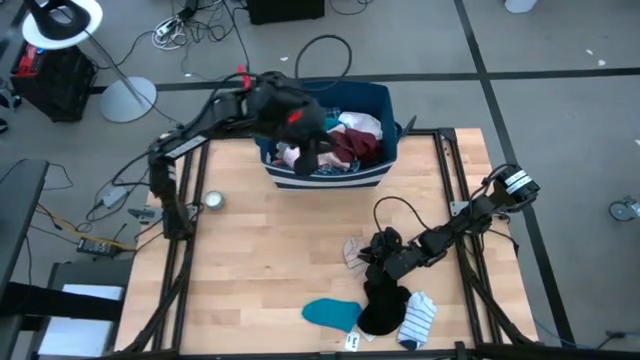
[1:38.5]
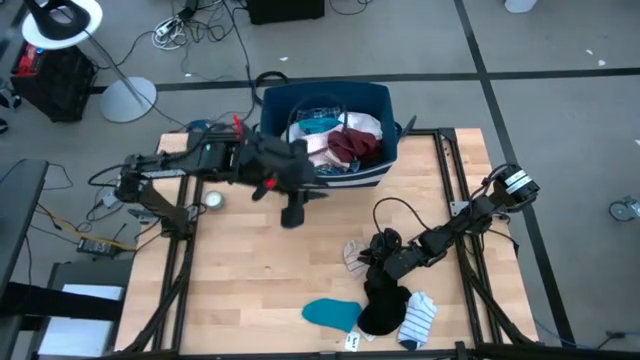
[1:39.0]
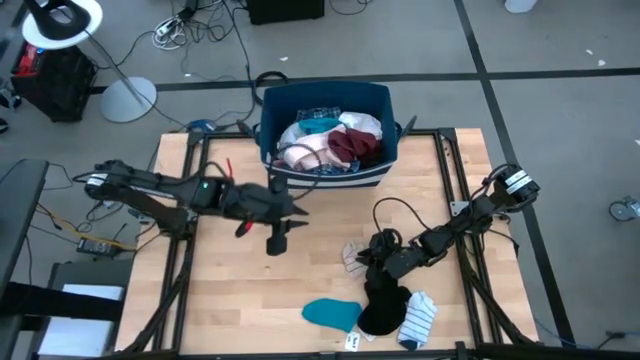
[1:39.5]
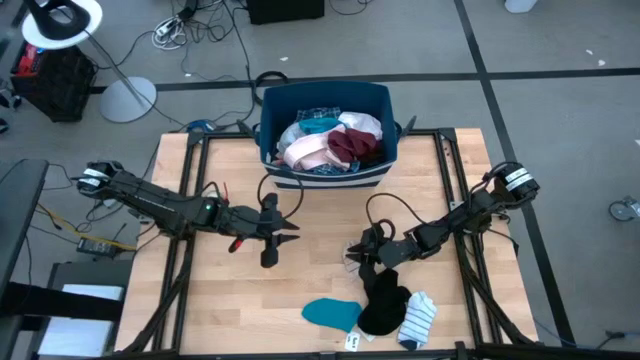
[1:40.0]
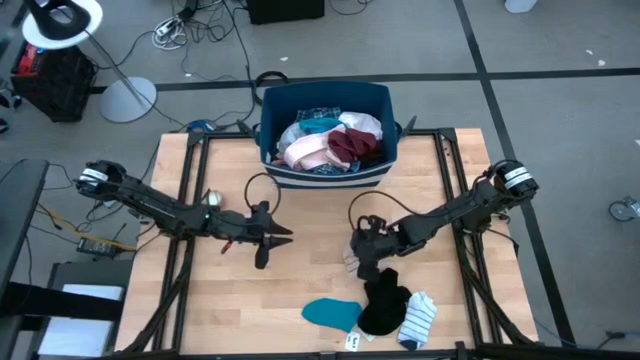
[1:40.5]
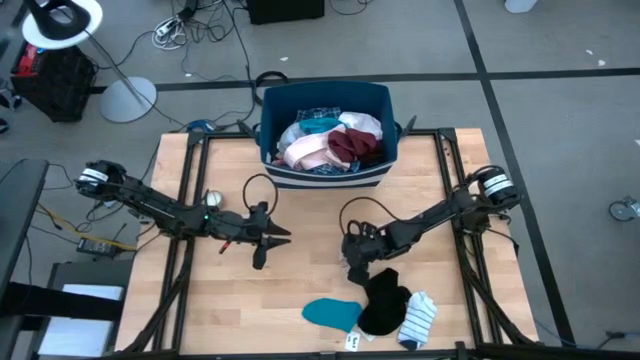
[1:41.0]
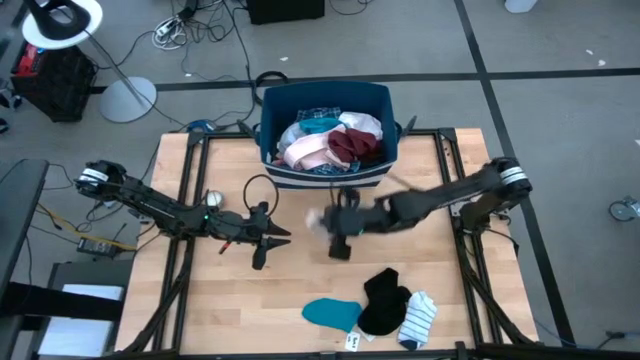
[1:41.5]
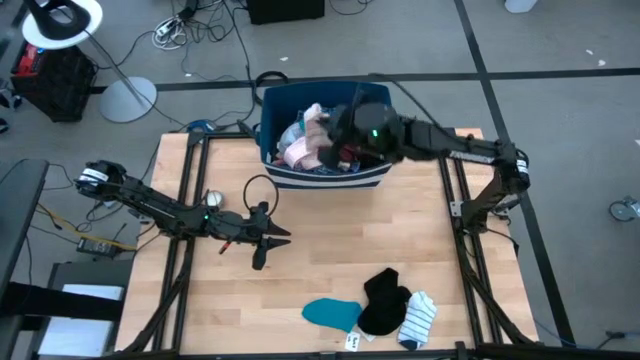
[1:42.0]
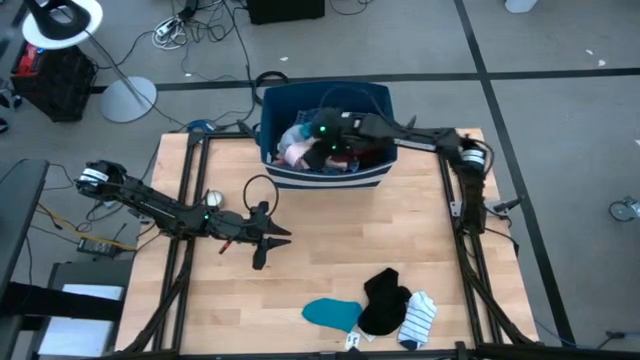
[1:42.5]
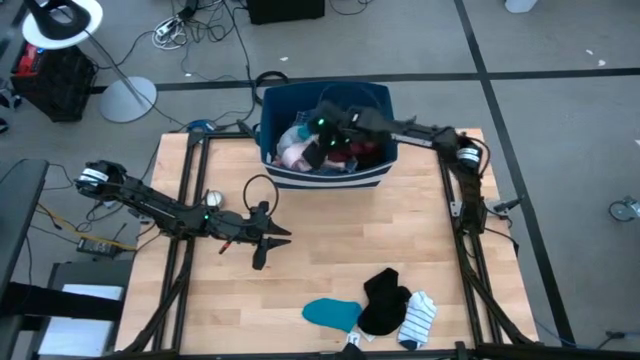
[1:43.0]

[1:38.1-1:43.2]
Task: Sort clothes
Put the striped sock into the blue laundry organizer

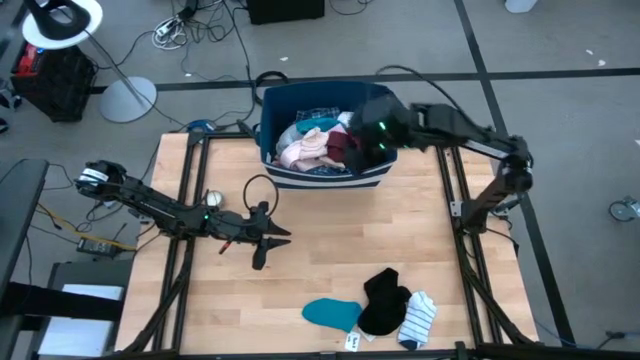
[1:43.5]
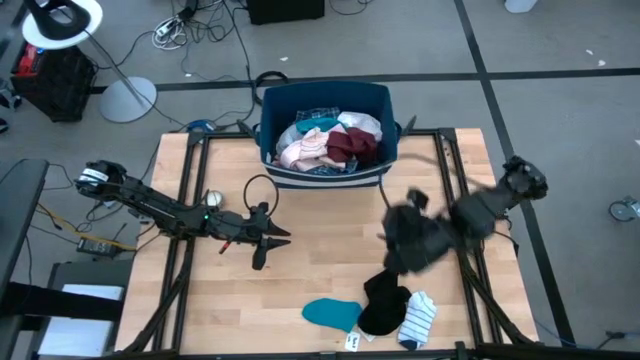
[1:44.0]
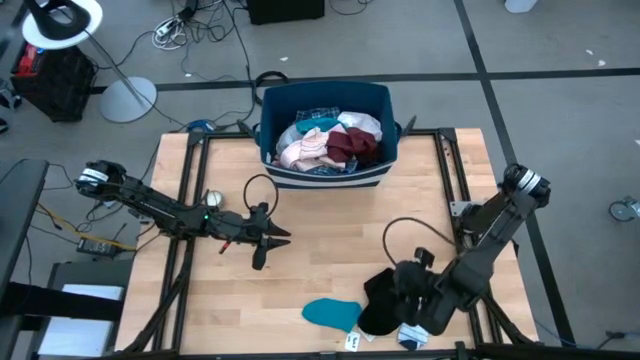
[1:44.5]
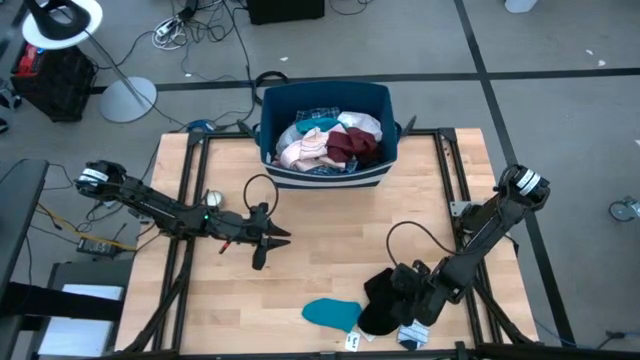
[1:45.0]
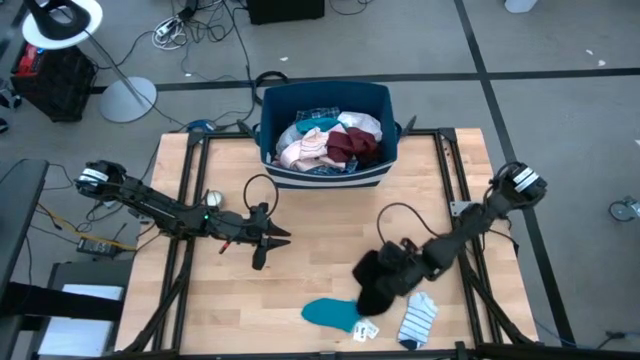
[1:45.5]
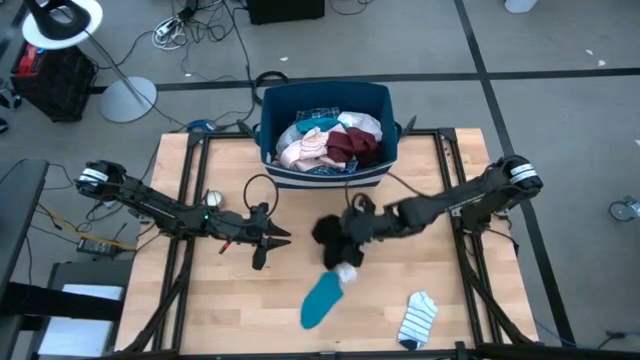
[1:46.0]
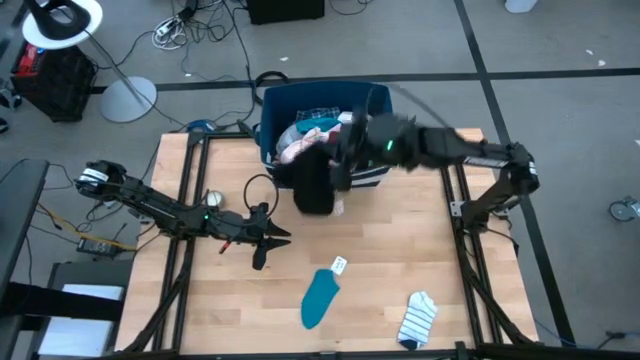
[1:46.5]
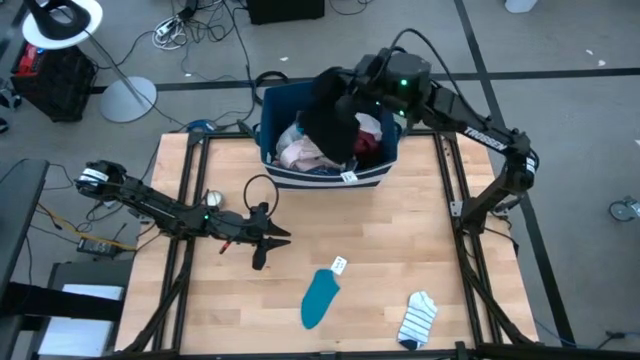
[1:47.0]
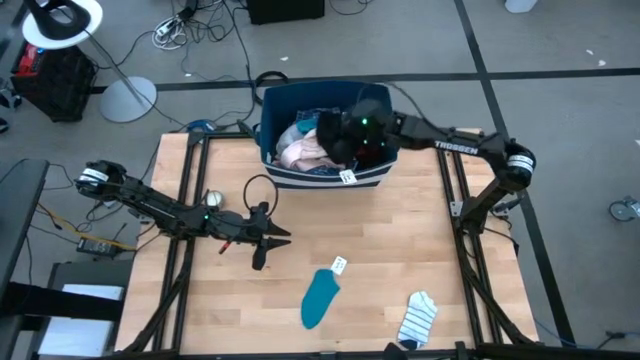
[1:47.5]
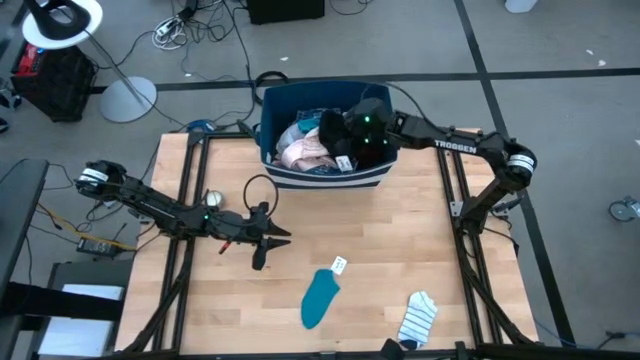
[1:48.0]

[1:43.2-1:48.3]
Put the black shorts into the blue laundry organizer

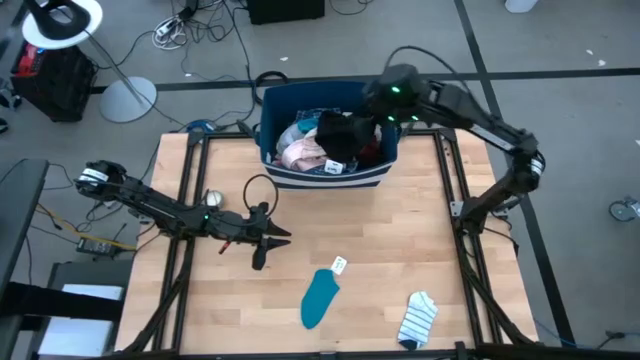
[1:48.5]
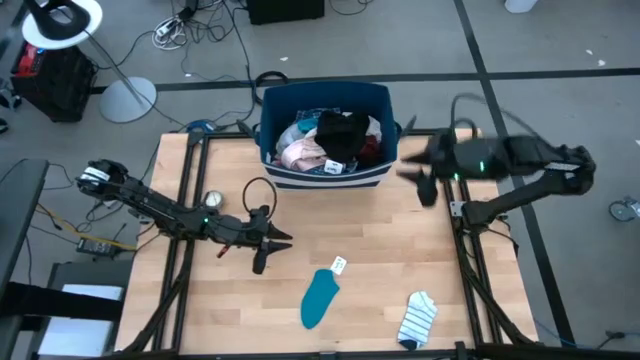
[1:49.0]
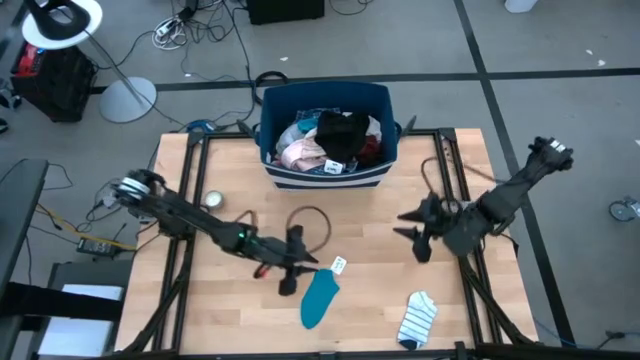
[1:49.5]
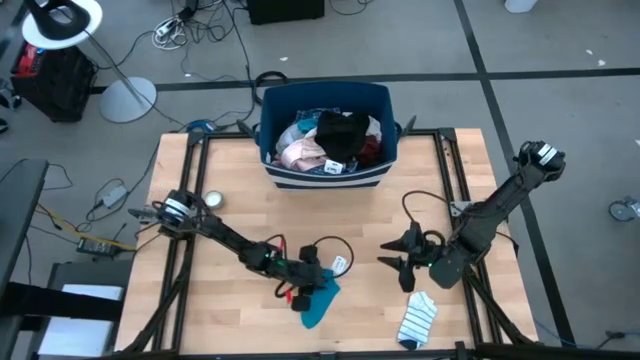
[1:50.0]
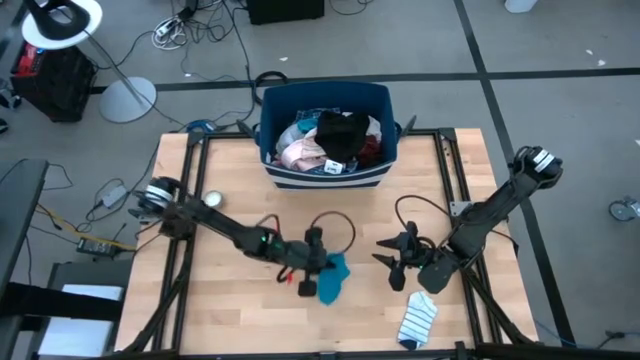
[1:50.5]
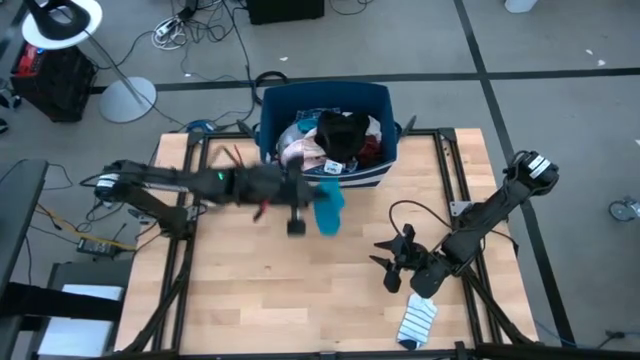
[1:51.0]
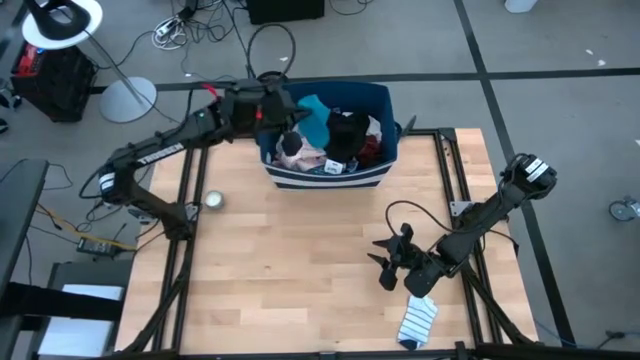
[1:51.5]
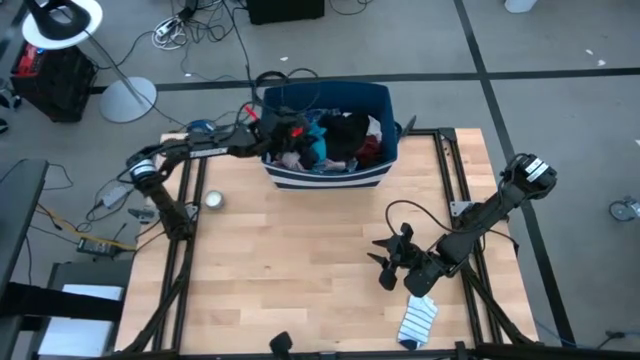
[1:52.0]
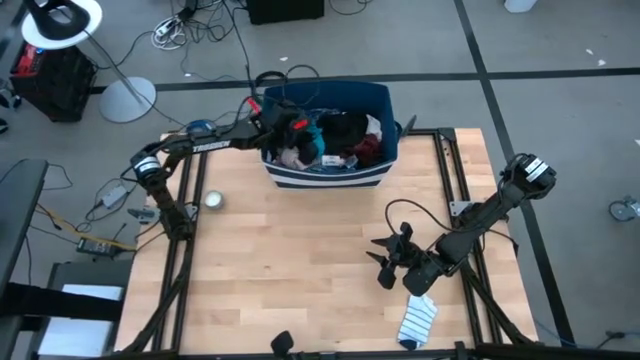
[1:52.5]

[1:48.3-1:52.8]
Put the blue sock into the blue laundry organizer

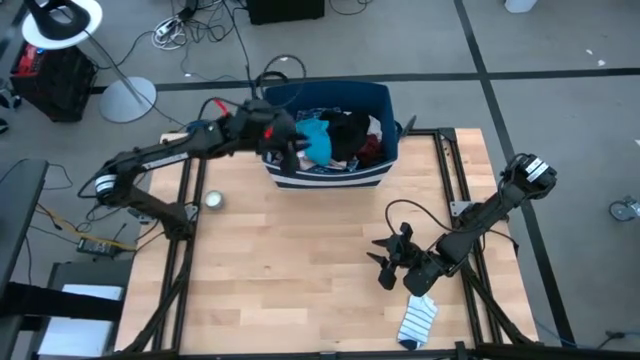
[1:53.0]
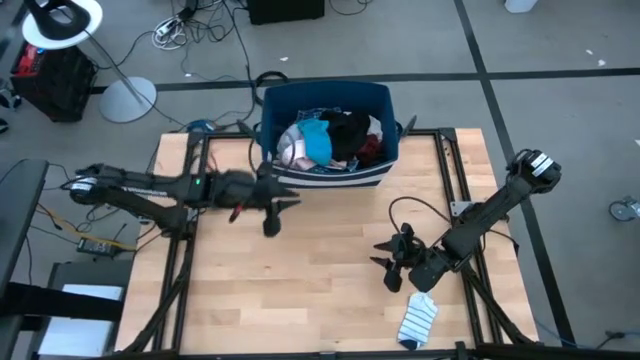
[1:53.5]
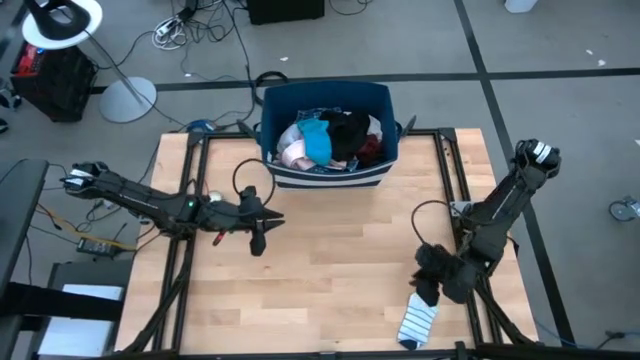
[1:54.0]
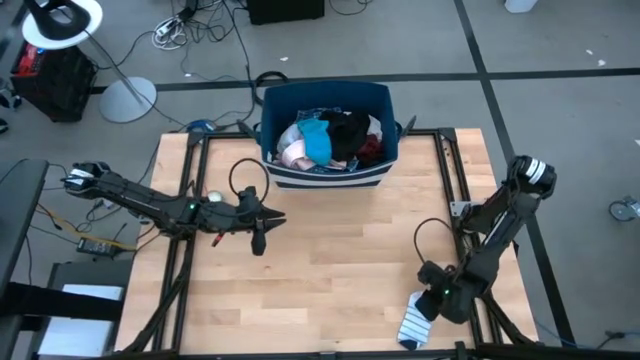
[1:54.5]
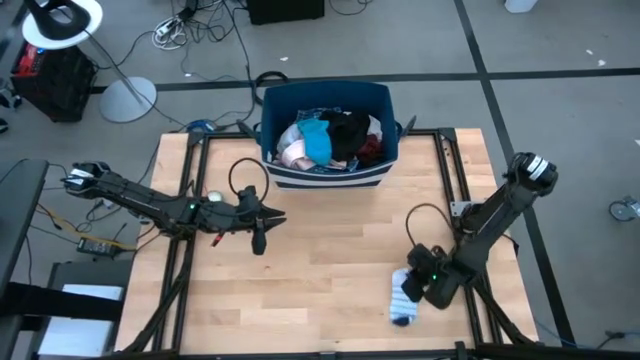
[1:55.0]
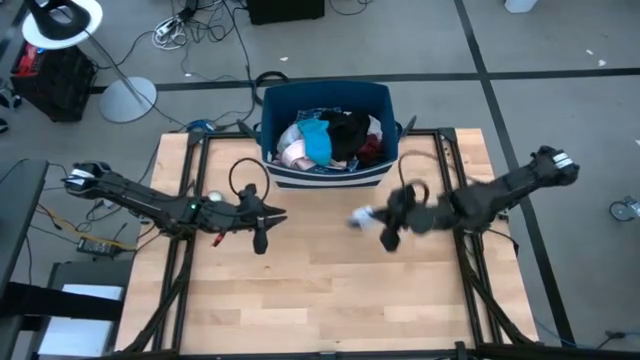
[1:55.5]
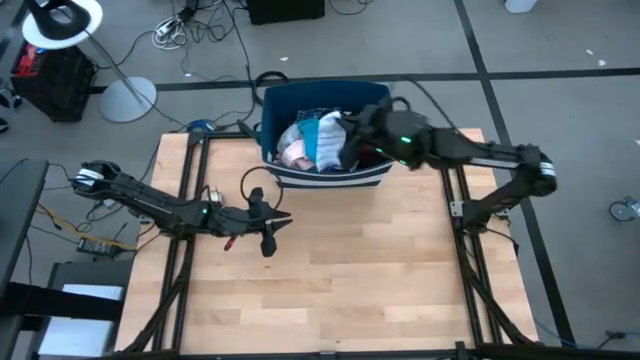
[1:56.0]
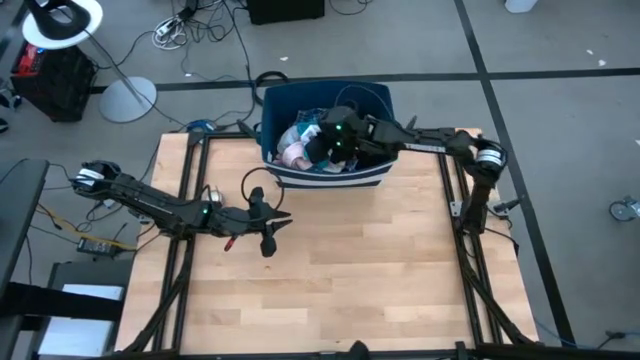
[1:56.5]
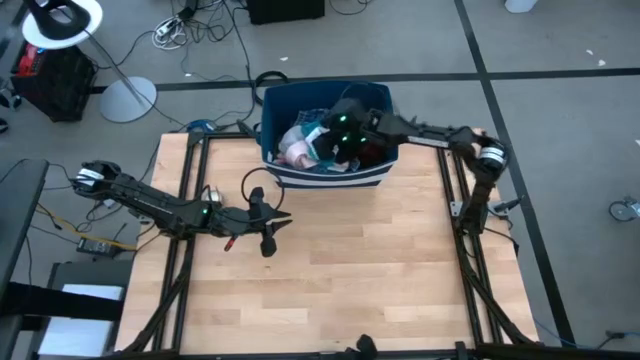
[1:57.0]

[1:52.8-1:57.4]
Put the striped sock into the blue laundry organizer

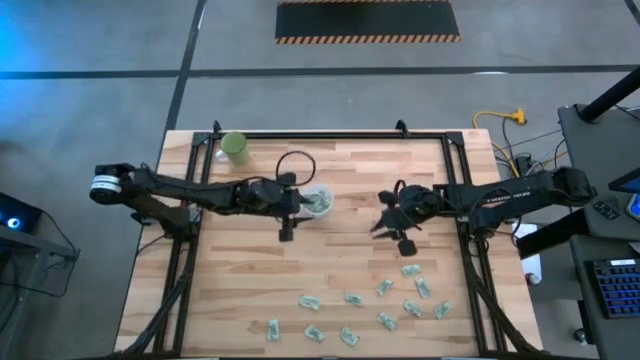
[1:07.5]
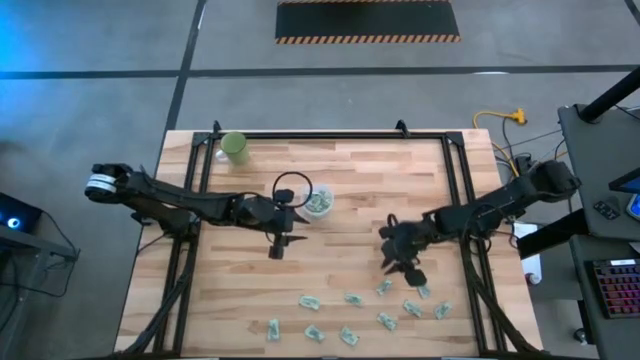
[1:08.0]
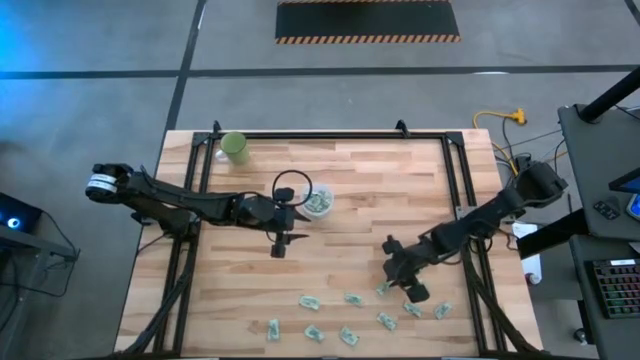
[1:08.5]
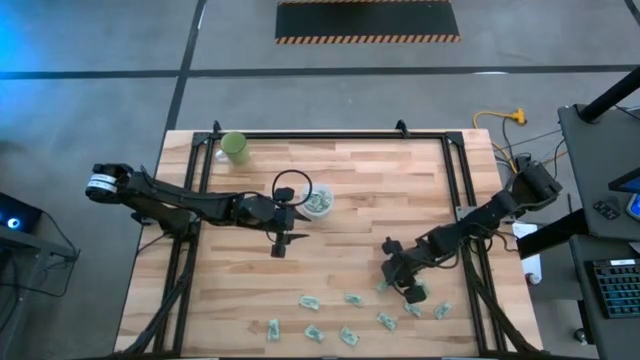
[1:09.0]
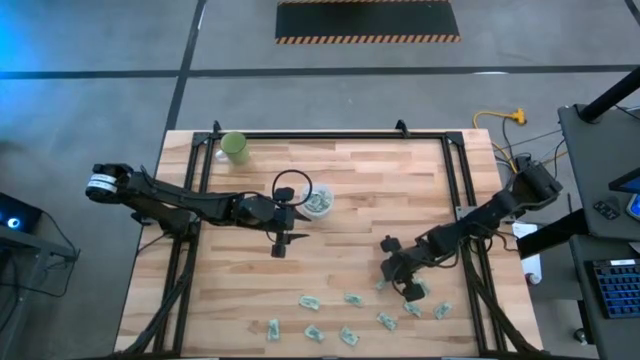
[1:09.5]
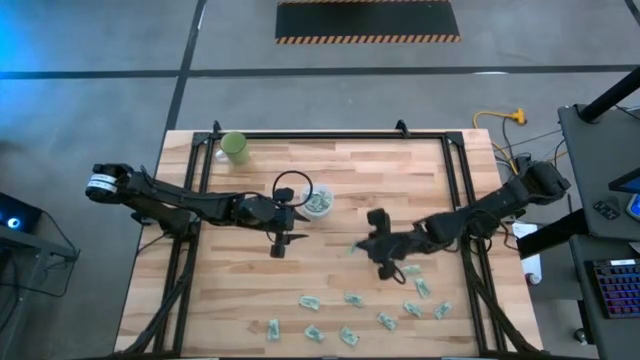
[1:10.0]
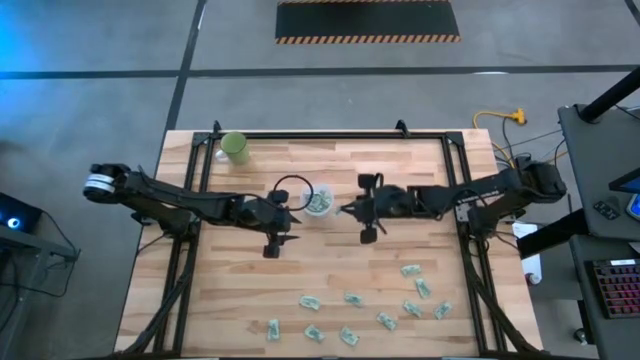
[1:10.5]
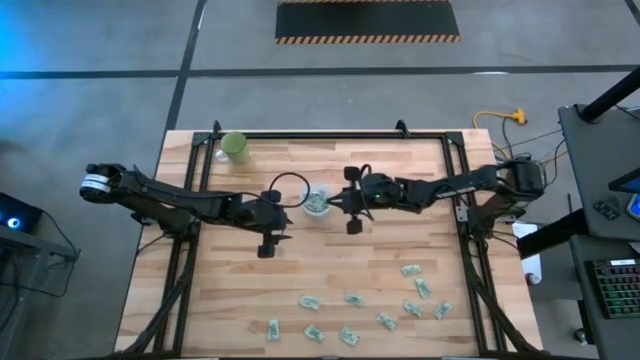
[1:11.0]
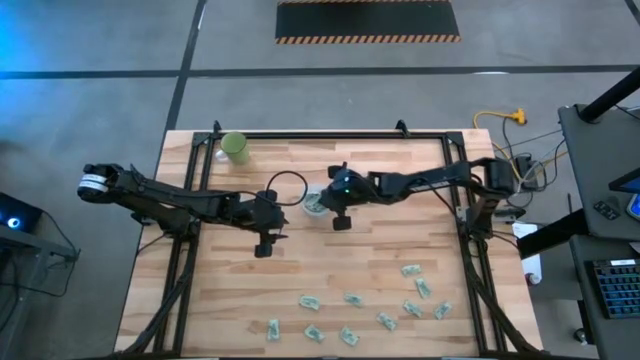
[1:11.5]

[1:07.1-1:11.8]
Task: Pick and place Stevia / Truvia into bins
Put the green stevia packet into the transparent container
